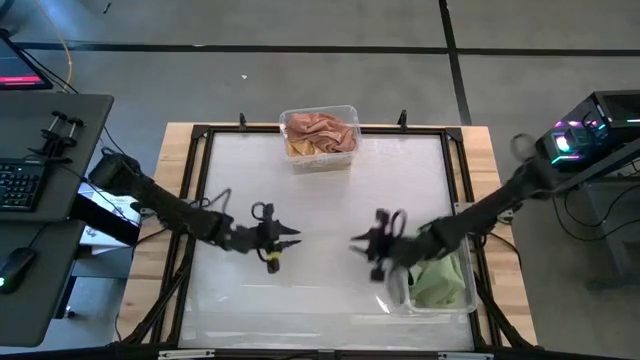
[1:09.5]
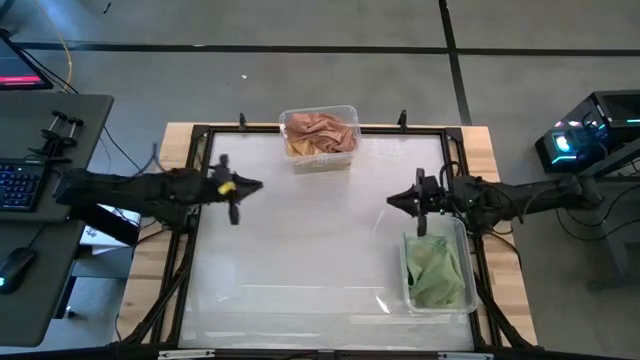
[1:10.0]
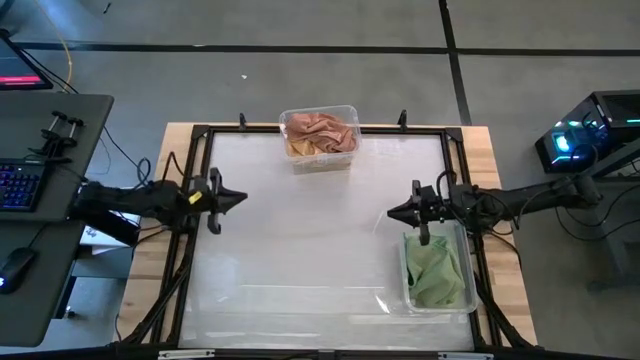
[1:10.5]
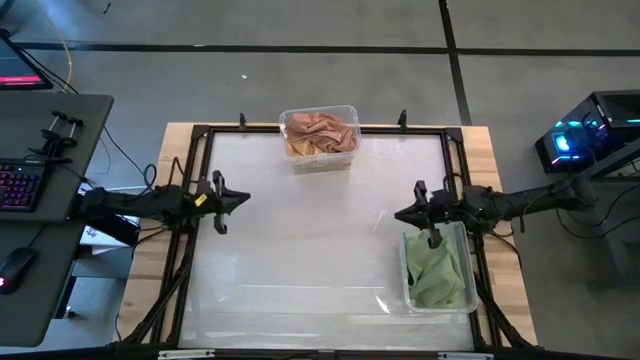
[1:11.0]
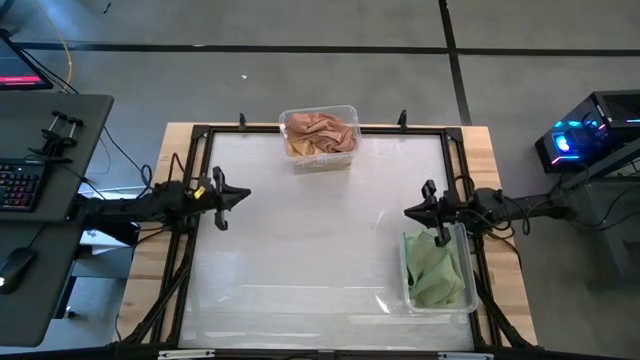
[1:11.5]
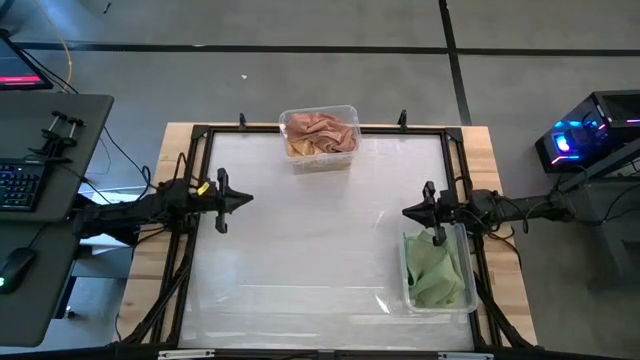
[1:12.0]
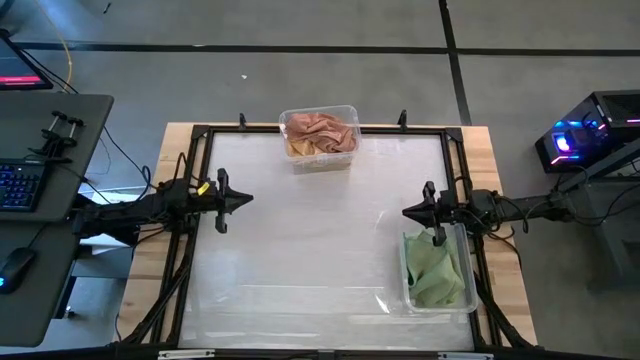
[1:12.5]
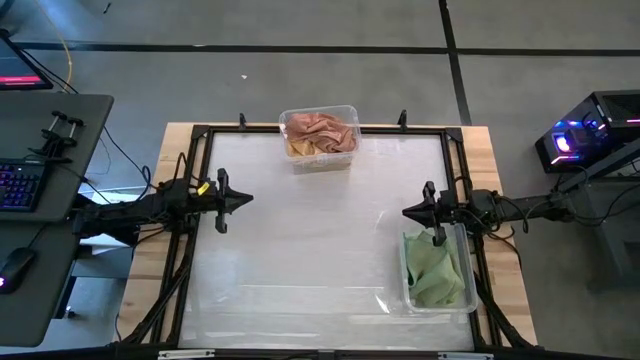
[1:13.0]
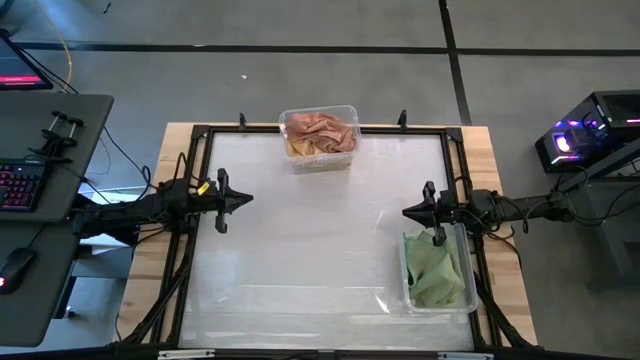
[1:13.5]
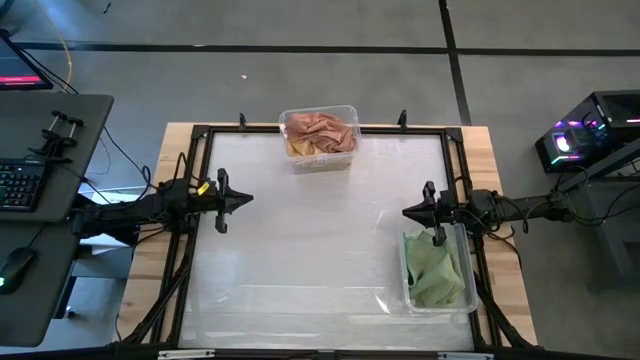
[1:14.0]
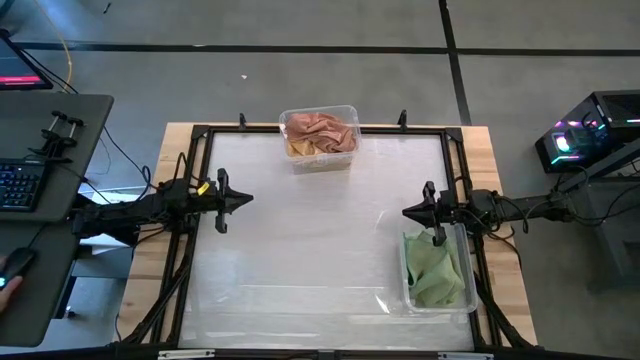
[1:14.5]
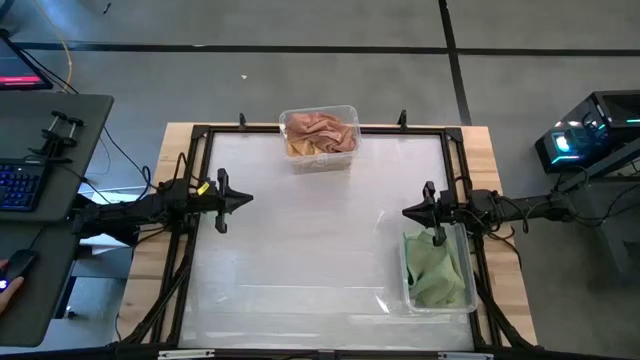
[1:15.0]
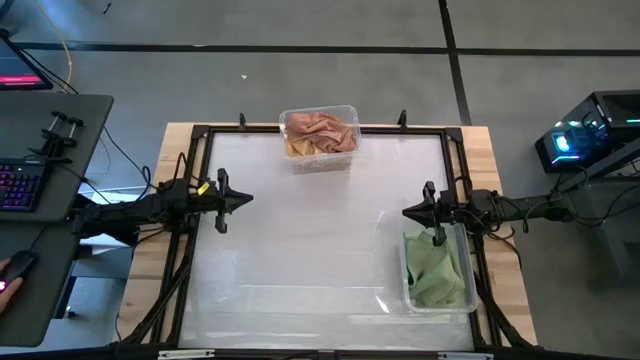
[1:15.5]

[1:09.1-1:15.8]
Task: Sort towels by color in basket
Return to Home Position

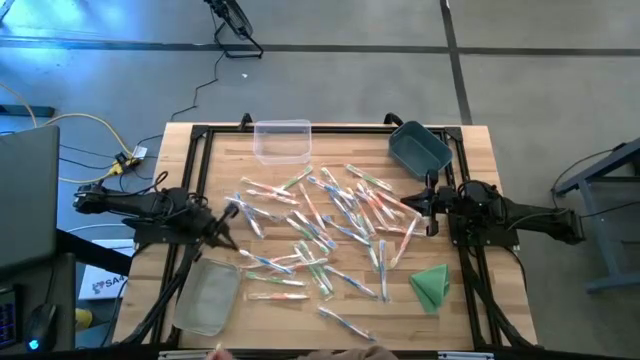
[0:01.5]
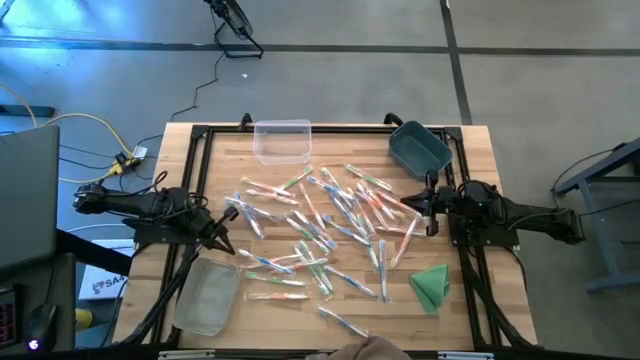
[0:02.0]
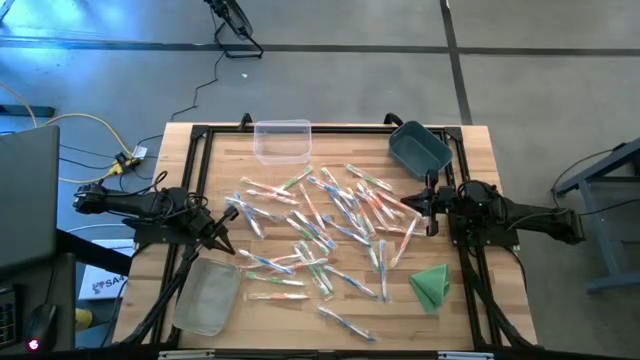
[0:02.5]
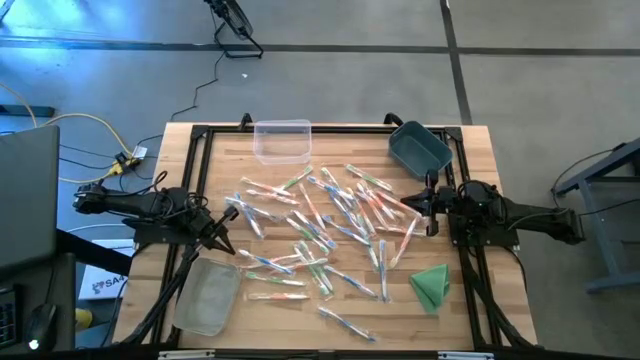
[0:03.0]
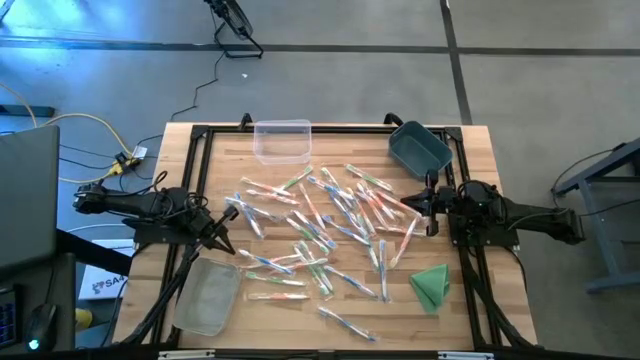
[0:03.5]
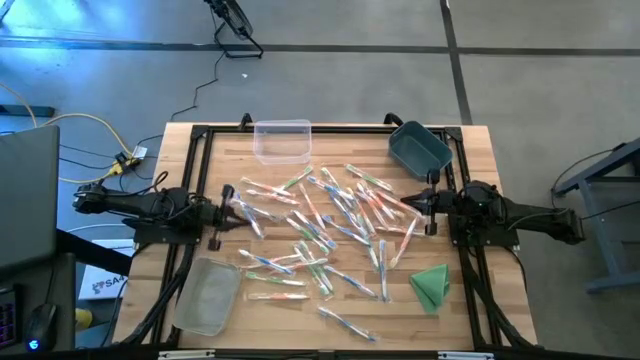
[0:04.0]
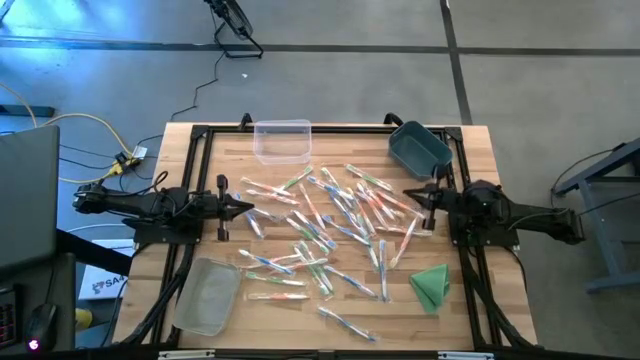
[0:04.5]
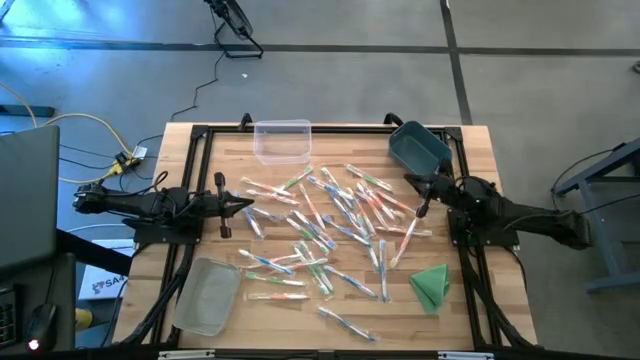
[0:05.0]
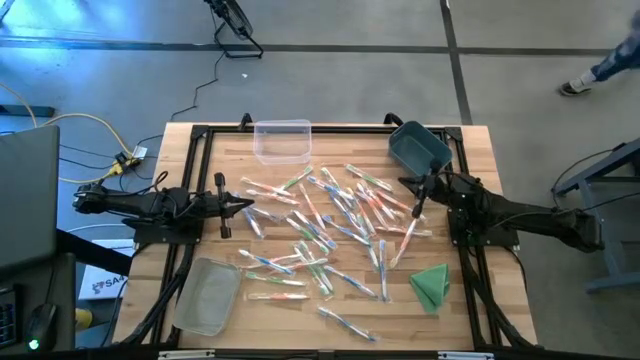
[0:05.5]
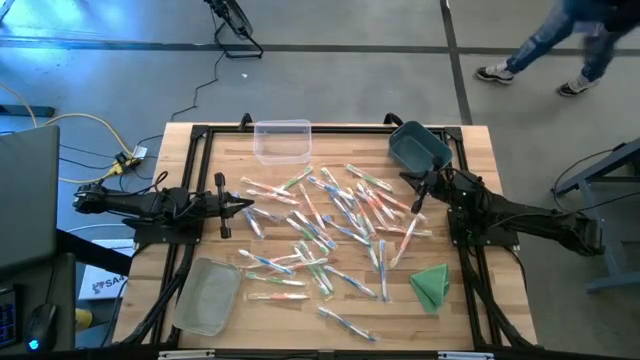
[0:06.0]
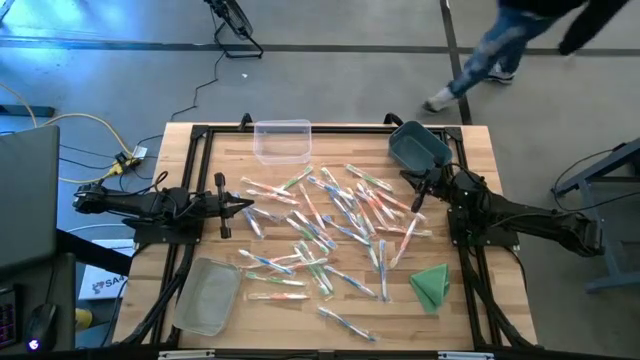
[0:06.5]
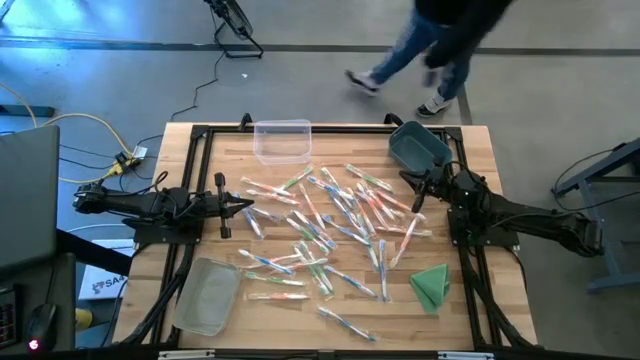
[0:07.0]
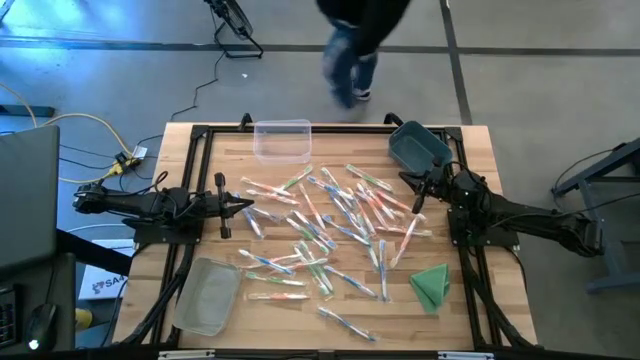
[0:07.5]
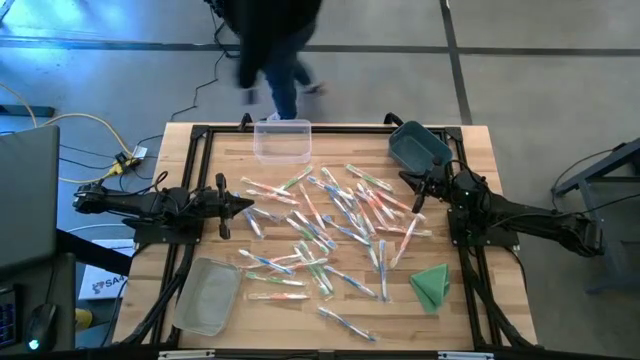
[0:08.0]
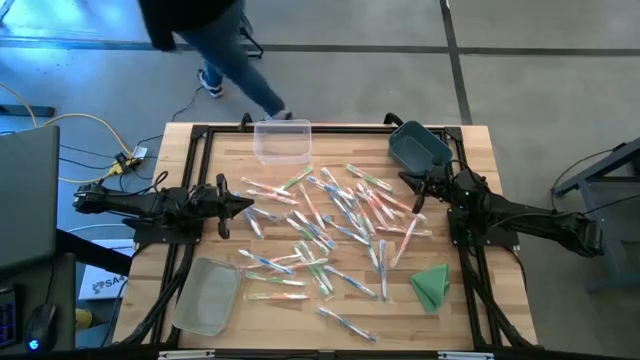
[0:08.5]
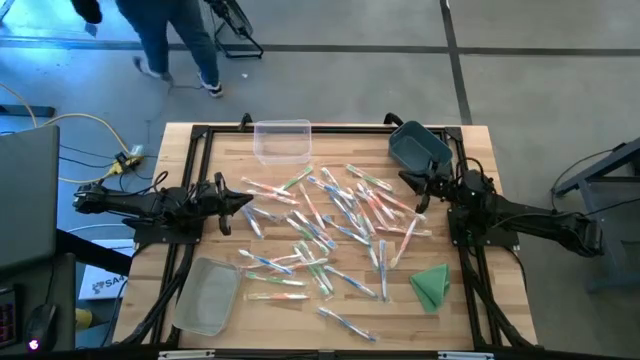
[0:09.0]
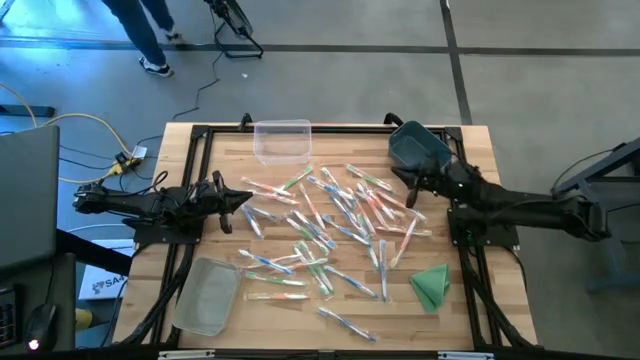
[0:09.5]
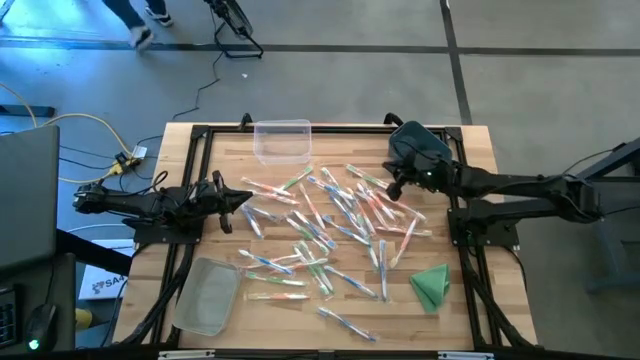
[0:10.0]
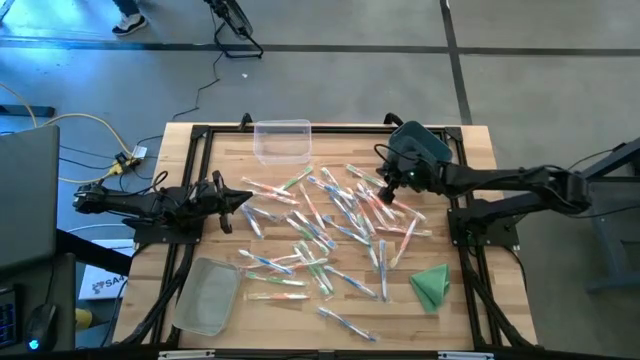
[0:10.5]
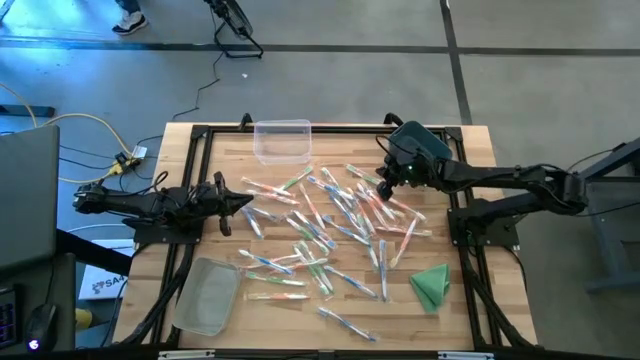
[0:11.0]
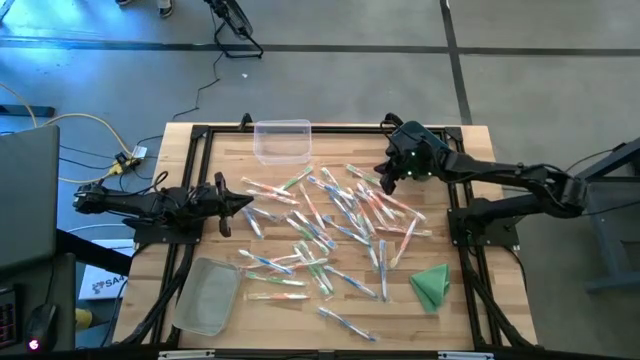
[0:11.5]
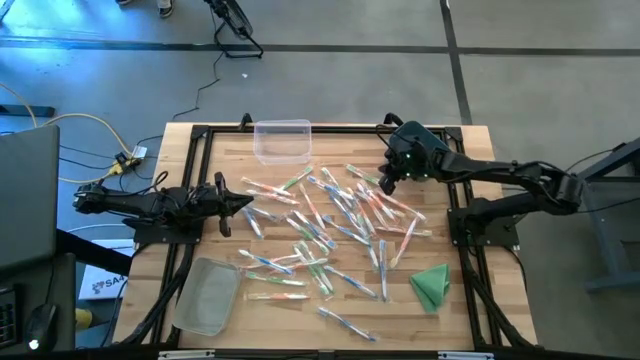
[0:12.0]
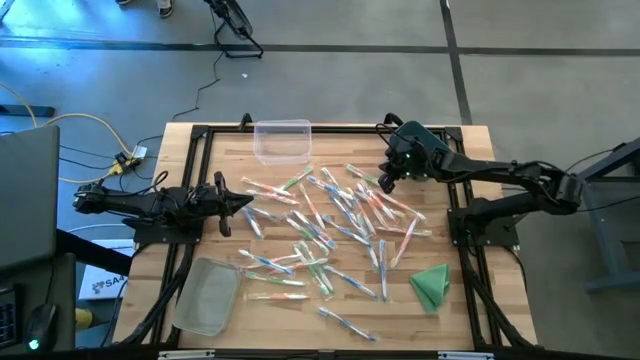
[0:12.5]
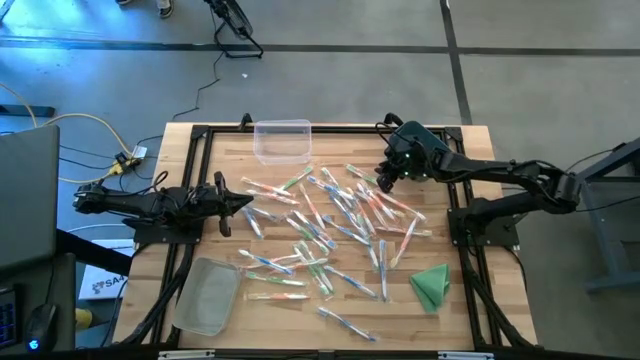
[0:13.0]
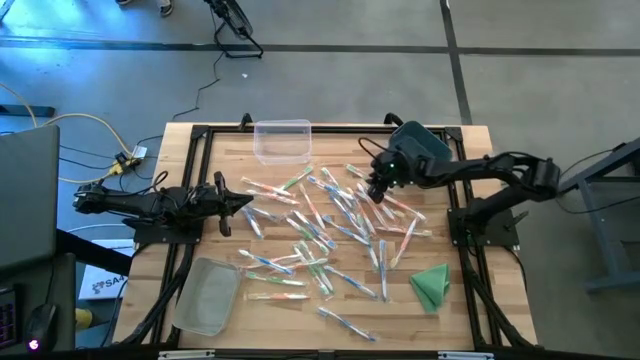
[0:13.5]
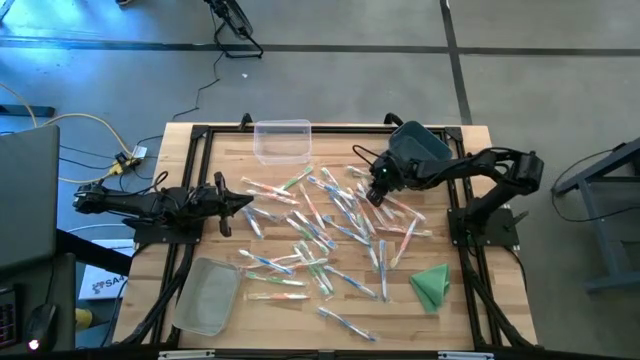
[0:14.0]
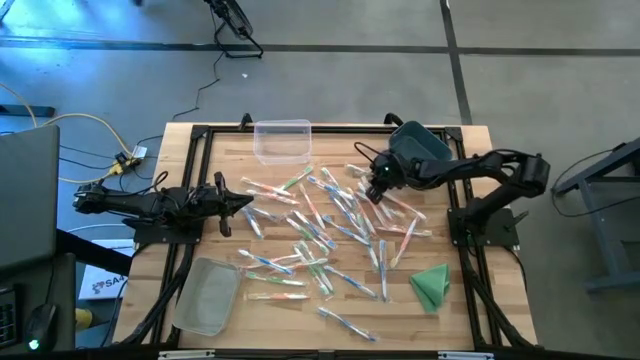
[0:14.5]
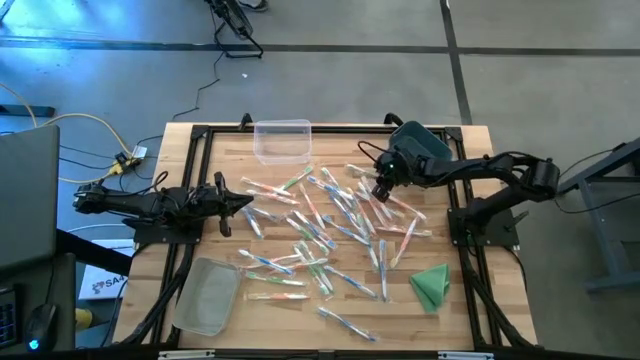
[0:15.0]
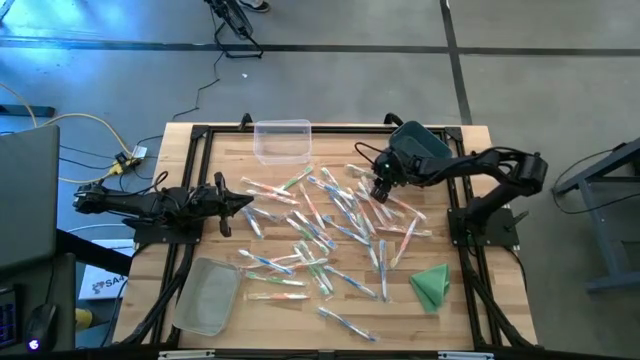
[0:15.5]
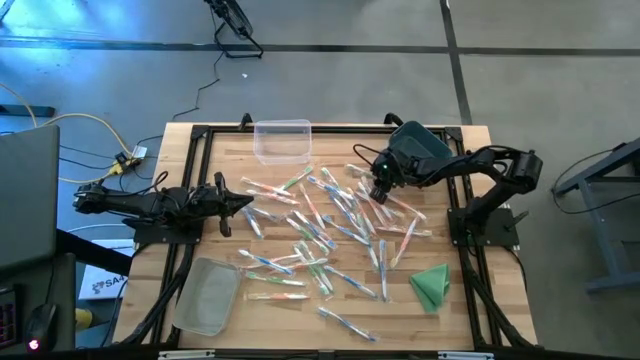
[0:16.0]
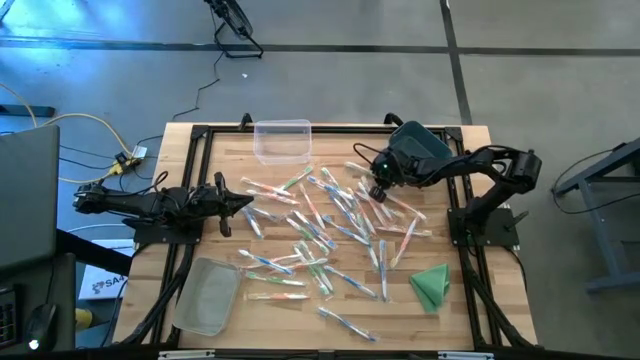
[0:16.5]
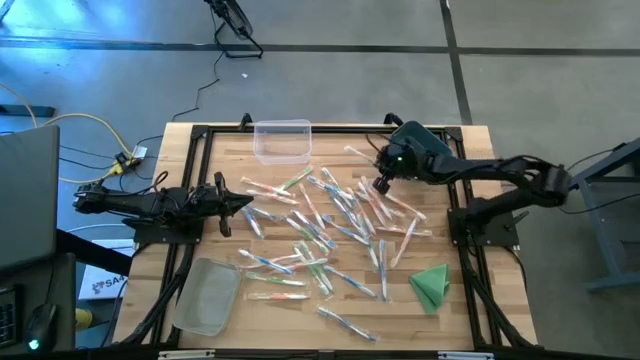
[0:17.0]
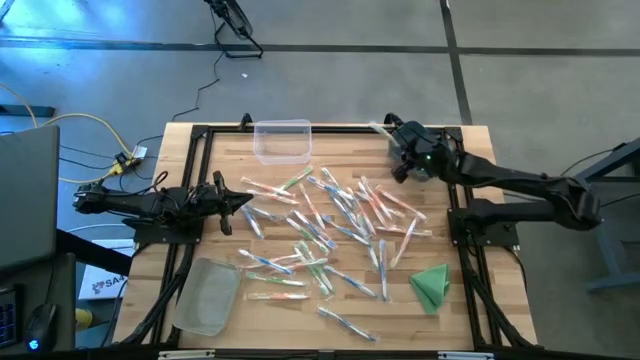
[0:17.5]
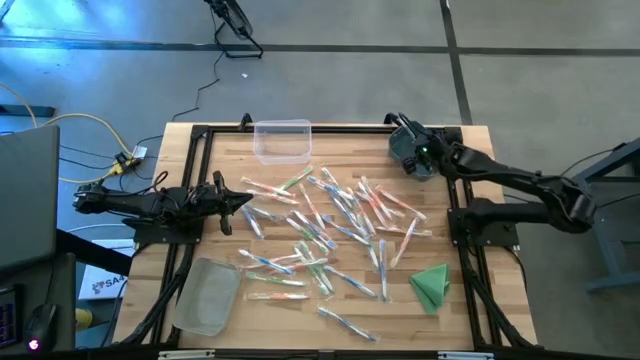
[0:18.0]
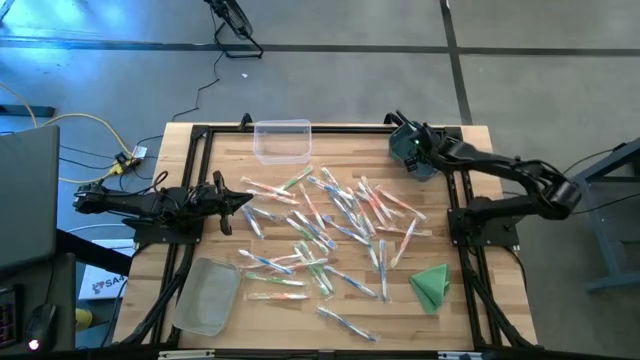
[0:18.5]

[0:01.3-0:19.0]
Task: Pick & Place Toothbrushes
Put the green toothbrush into the blue bin
